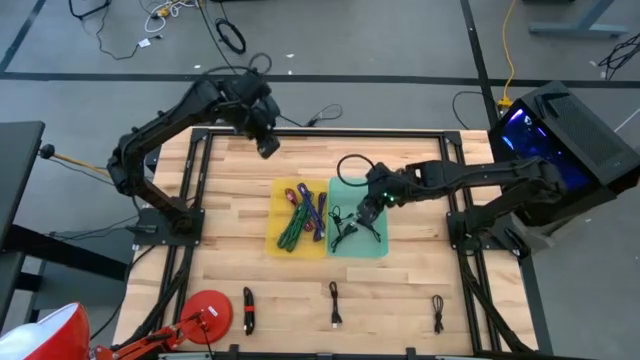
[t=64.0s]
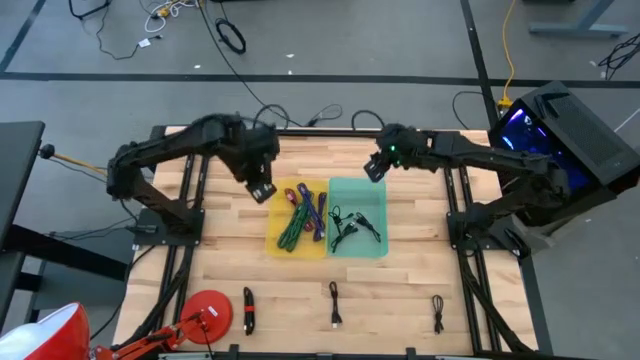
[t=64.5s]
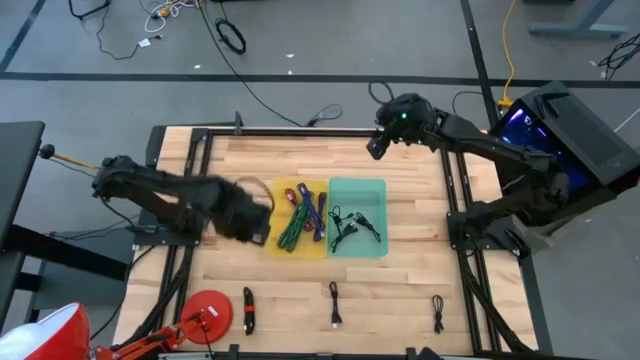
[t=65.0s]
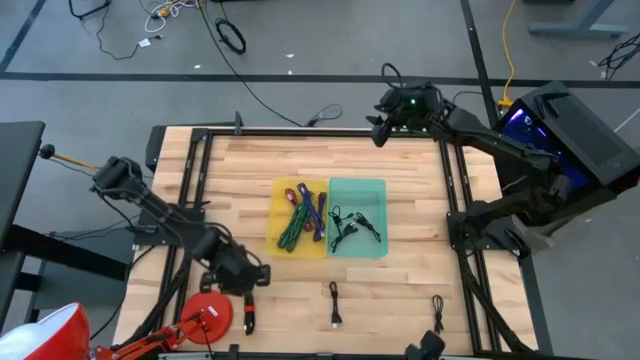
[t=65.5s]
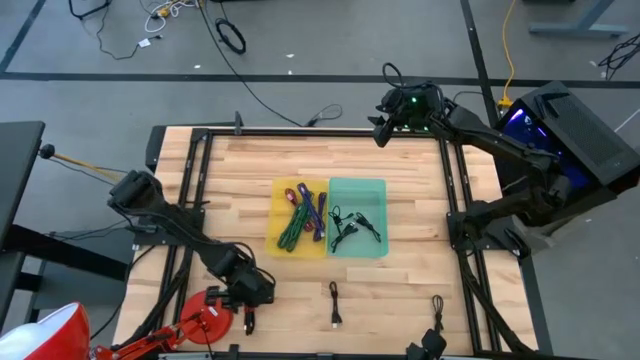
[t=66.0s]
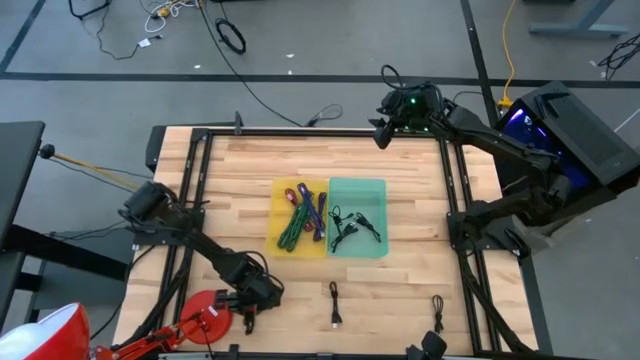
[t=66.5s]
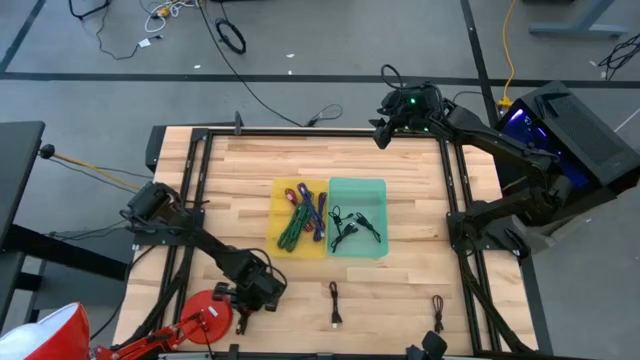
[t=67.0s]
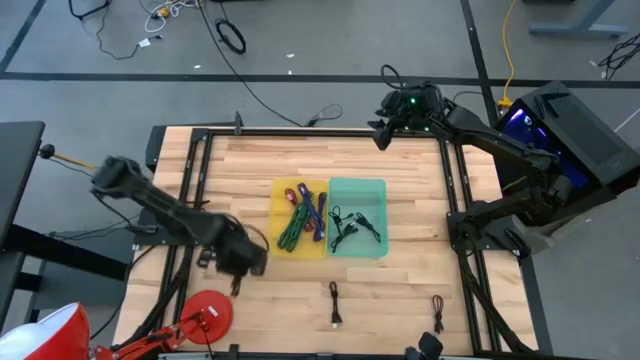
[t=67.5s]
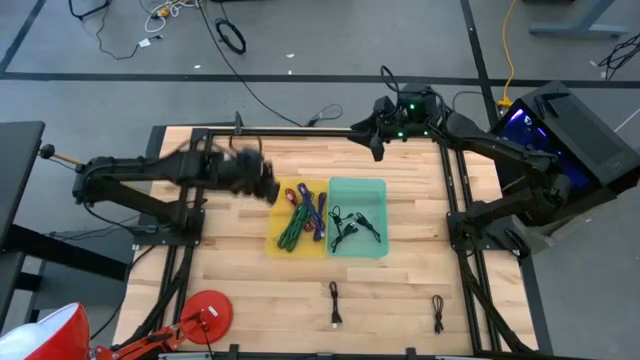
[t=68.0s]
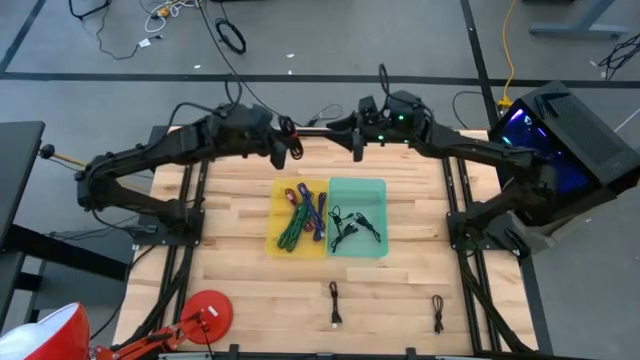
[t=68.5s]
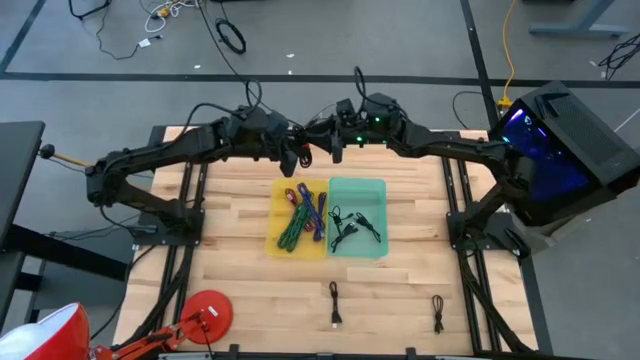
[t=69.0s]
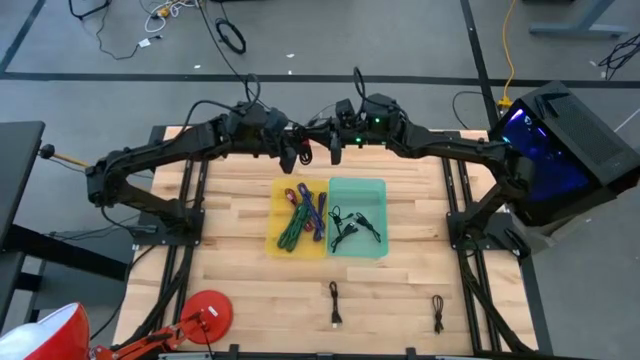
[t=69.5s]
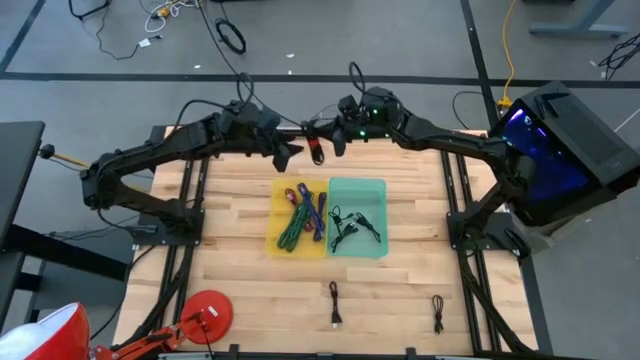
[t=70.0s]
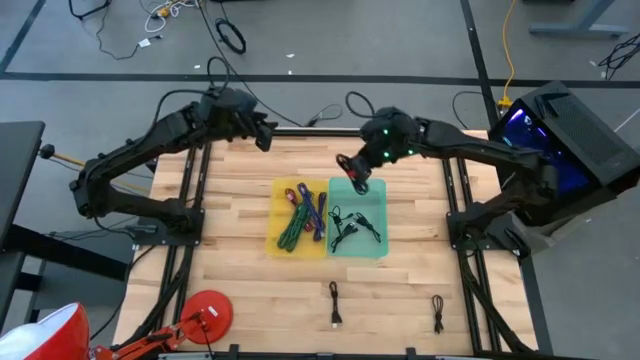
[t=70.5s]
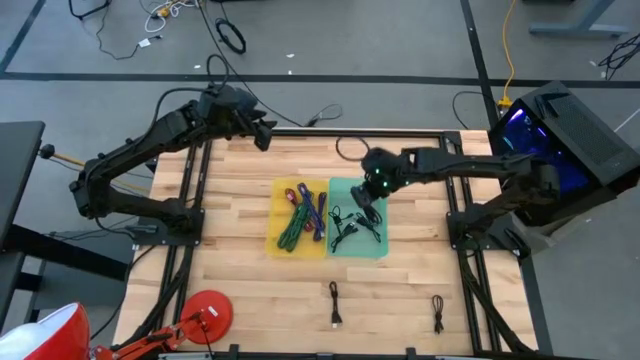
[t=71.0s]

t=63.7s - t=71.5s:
Task: Pick & Place USB Port
Put the black charger cable into the green bin

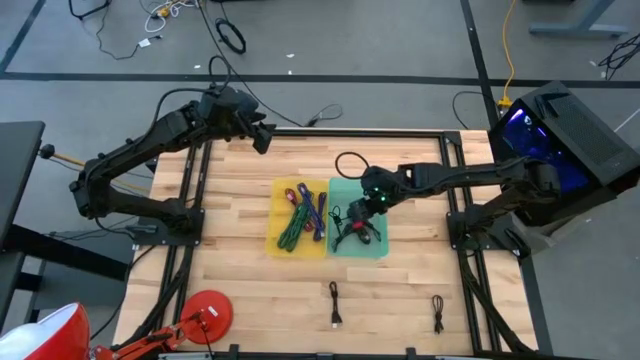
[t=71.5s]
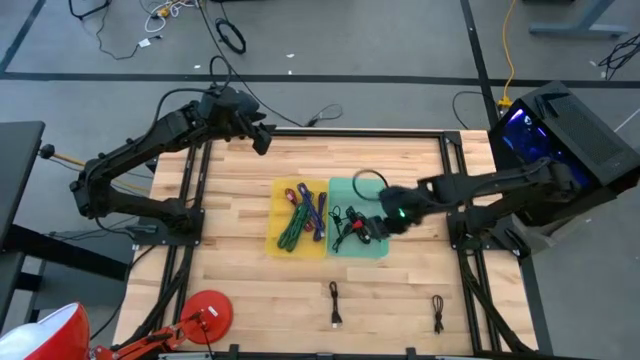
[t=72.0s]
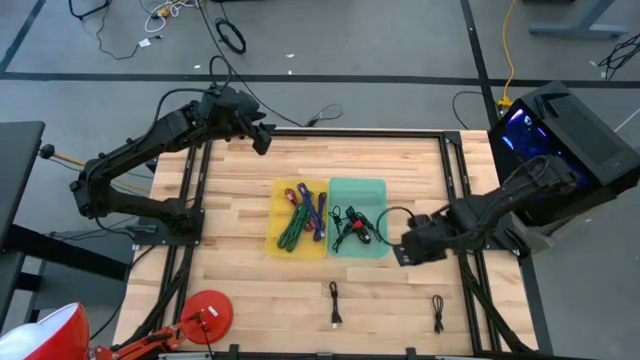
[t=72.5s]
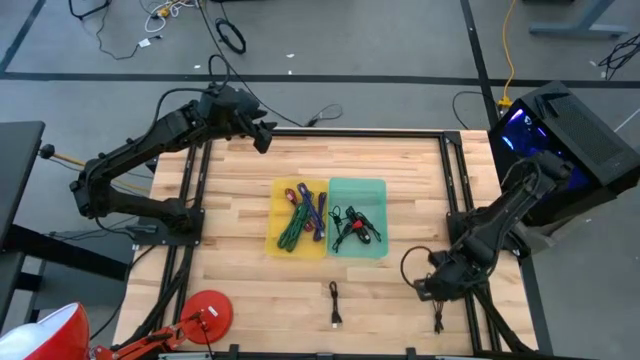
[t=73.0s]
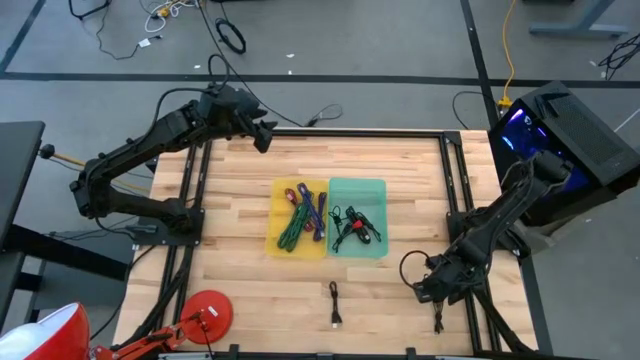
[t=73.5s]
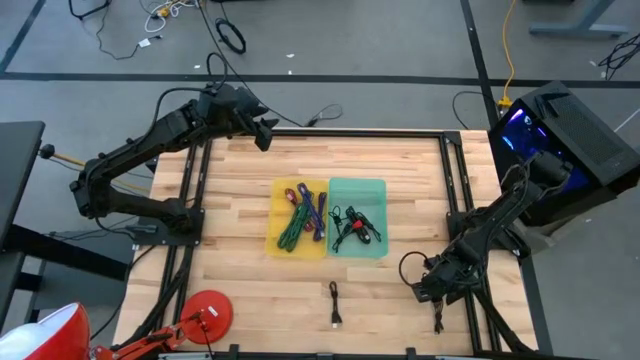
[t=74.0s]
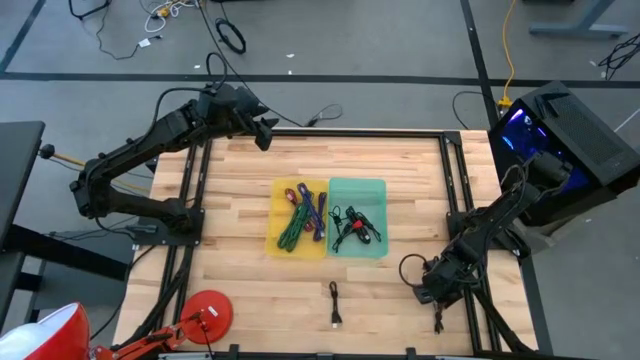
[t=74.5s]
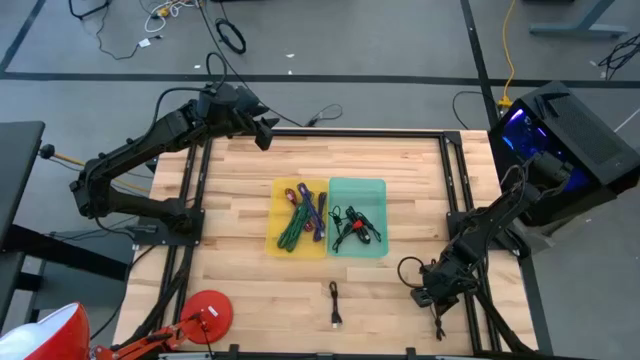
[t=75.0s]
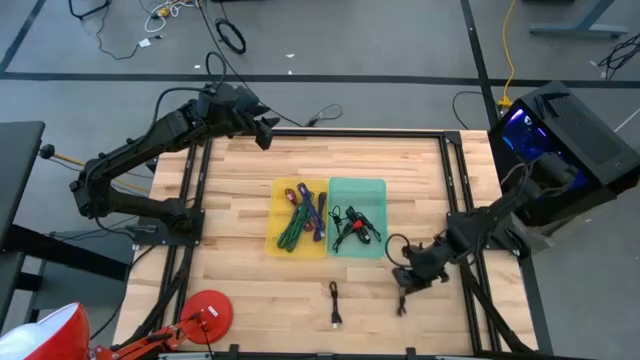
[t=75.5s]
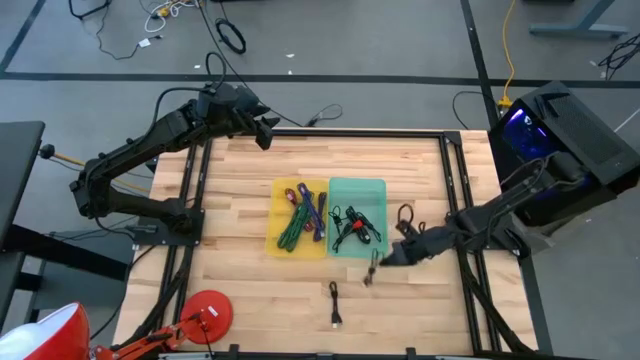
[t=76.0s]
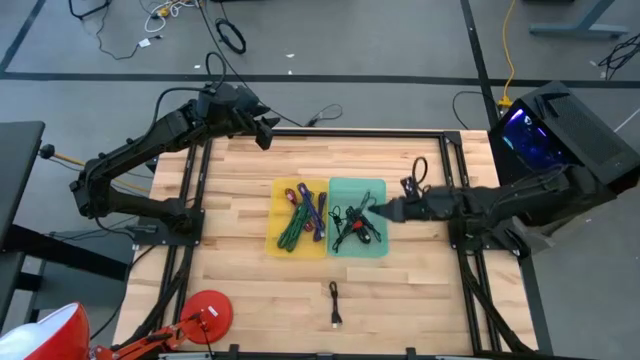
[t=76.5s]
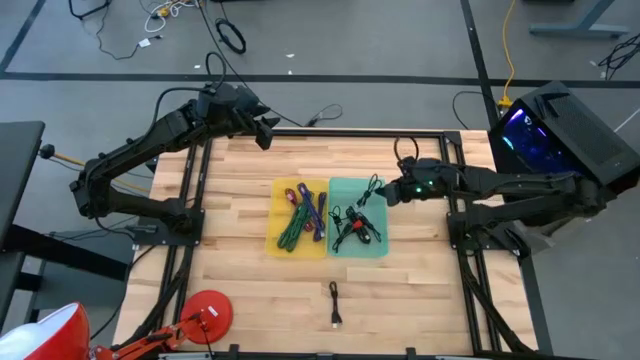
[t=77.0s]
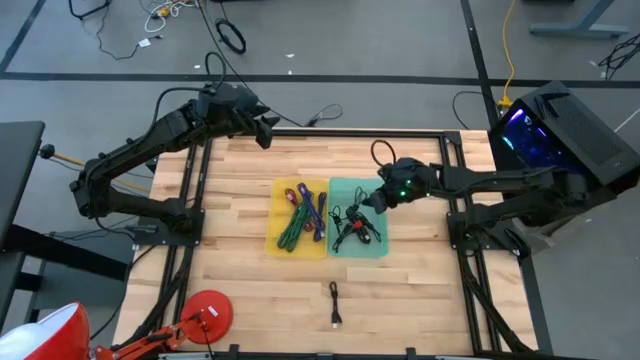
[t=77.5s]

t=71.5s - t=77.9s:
Put the black charger cable into the green bin

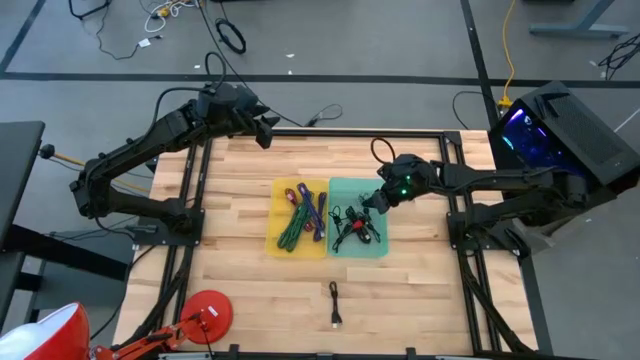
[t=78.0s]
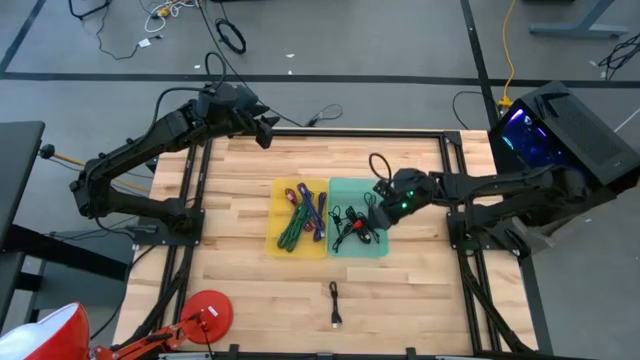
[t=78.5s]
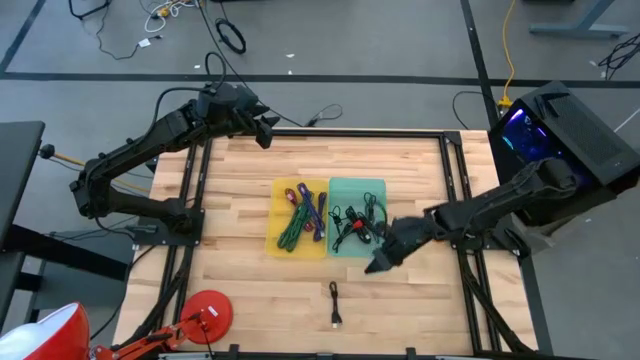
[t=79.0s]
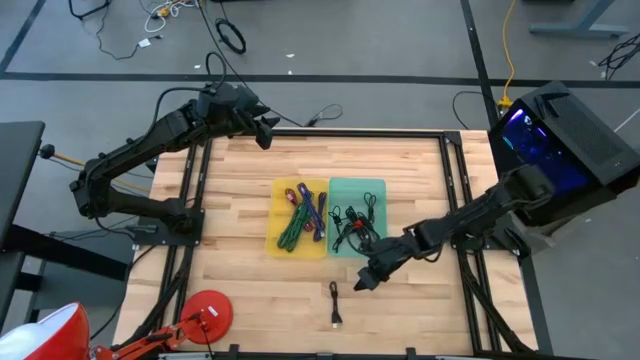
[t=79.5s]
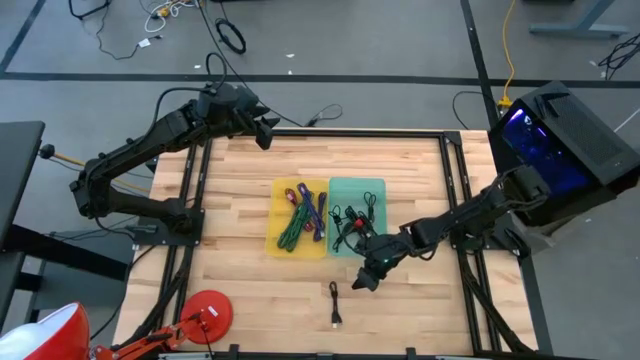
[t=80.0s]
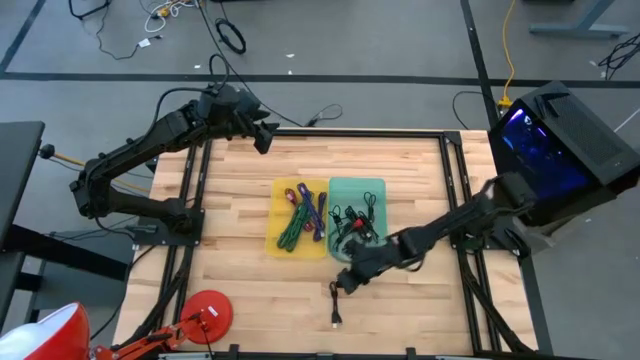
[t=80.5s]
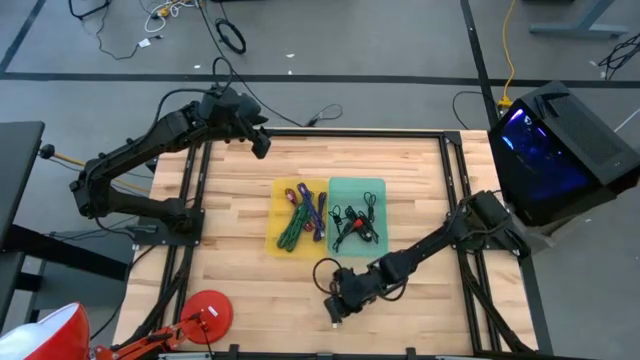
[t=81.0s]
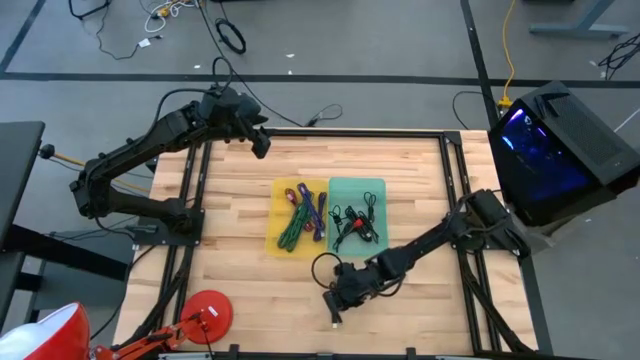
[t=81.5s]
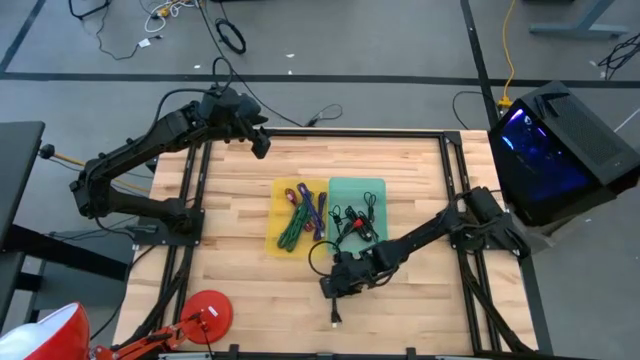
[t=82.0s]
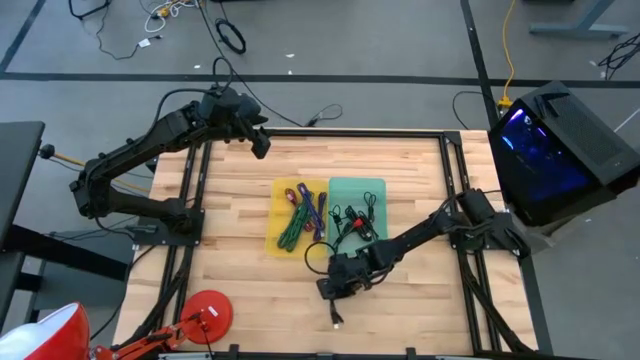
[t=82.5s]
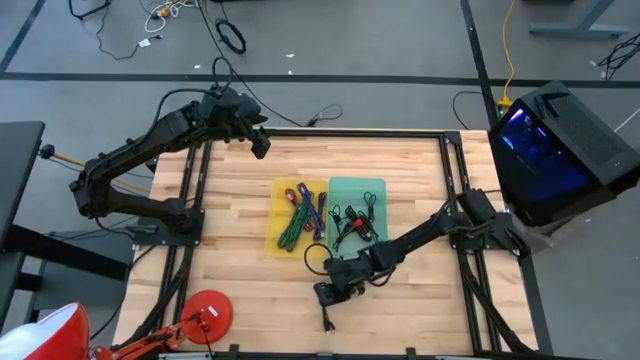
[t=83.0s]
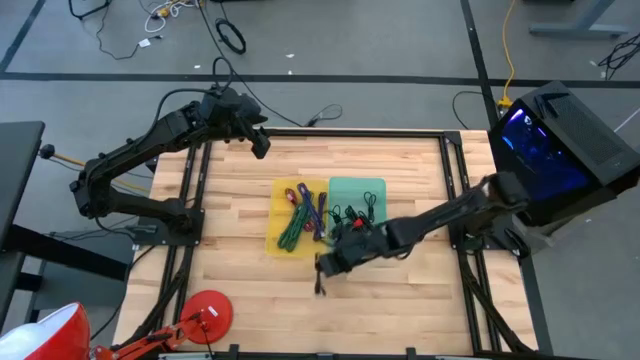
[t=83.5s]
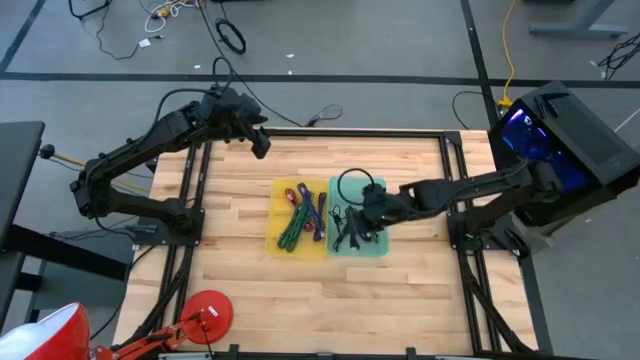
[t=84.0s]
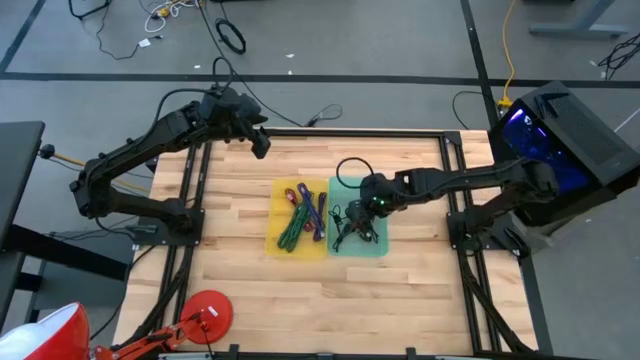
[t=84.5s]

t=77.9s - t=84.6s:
Put the black charger cable into the green bin

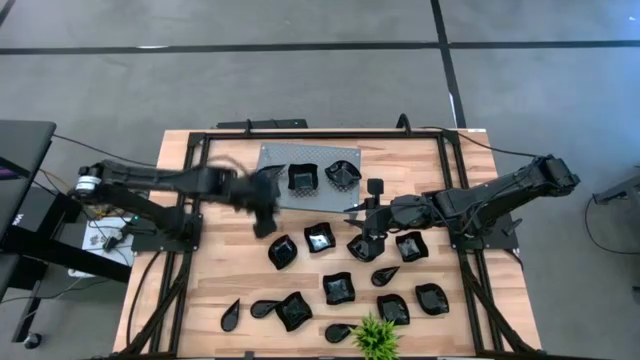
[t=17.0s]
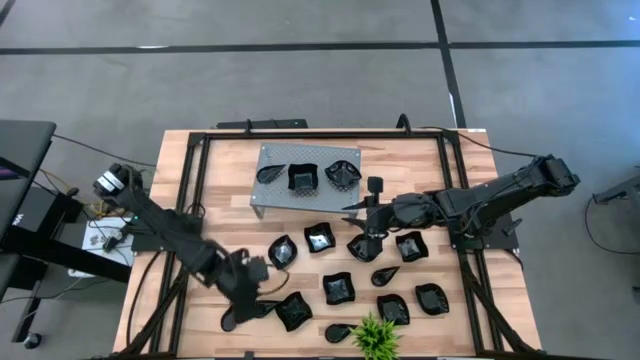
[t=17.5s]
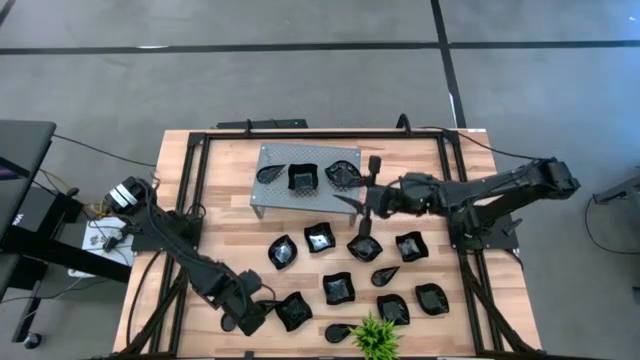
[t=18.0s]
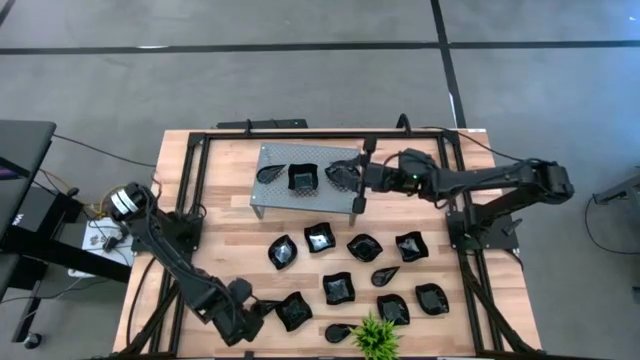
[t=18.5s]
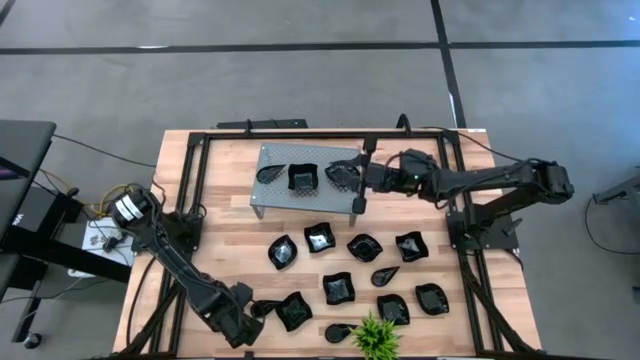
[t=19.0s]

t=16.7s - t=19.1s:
Task: Pick & Place Mini shaped plates
Stack the black drop-shaped plate on top of the black drop-shaped plate on the shelf
